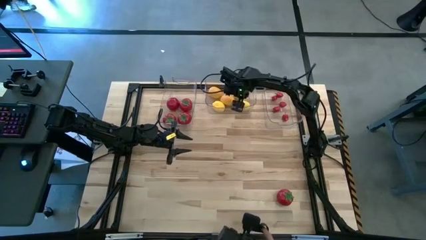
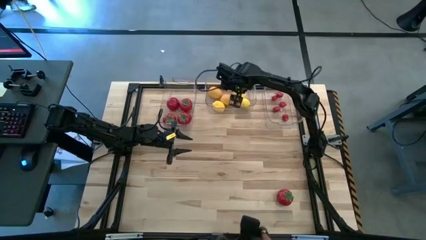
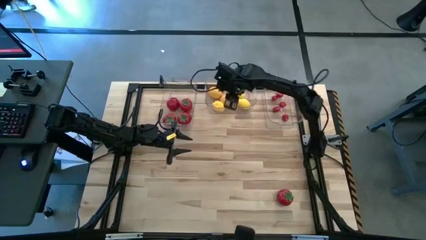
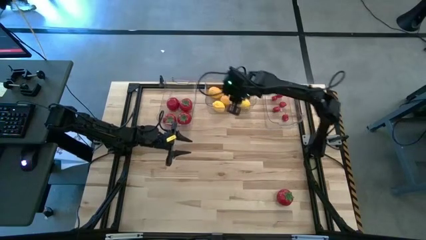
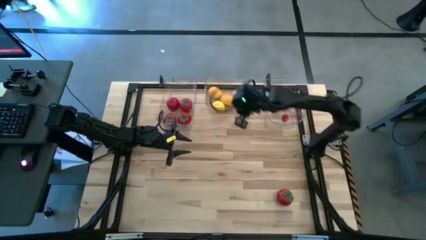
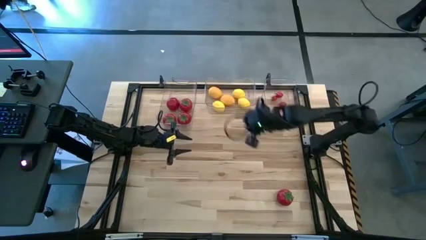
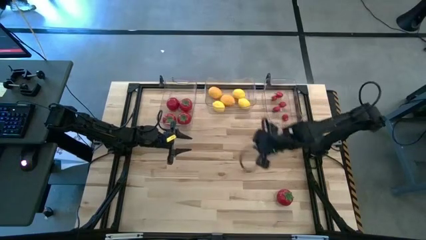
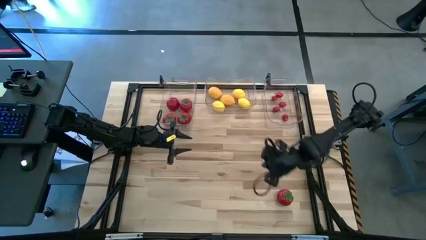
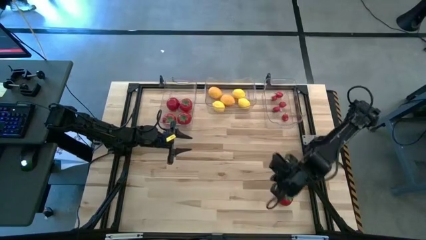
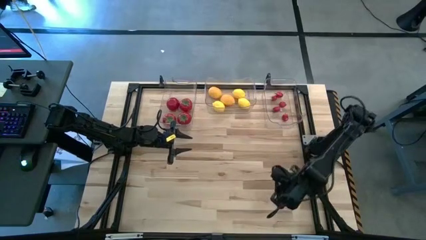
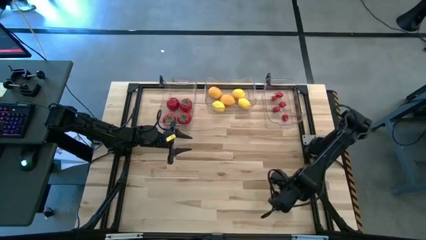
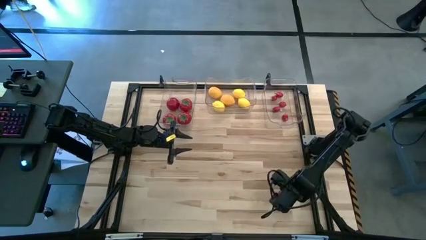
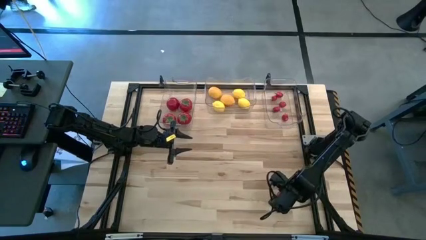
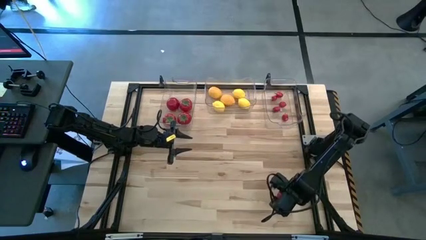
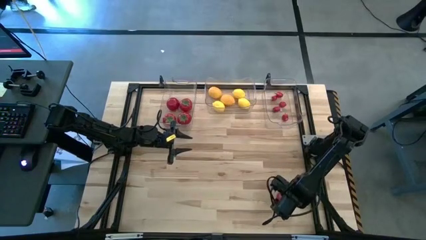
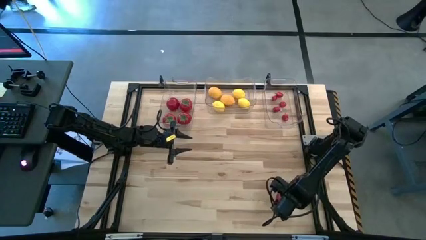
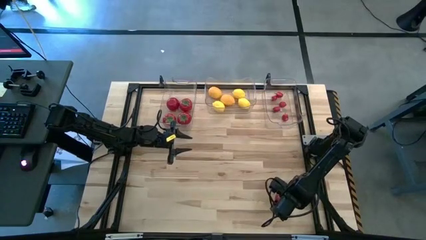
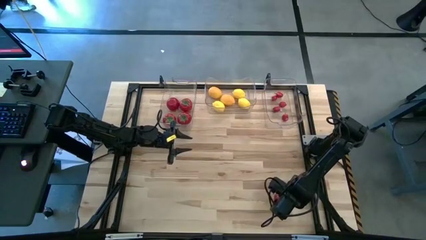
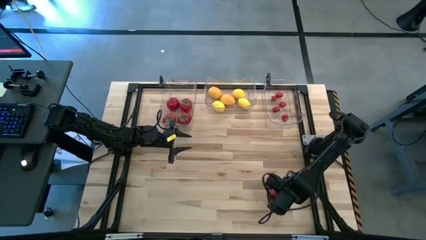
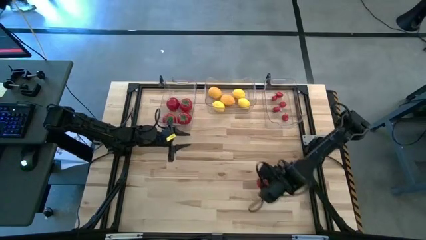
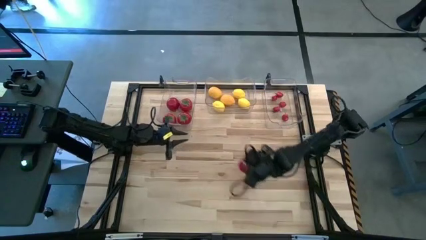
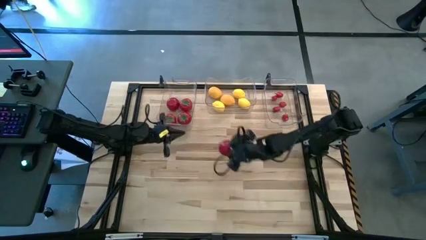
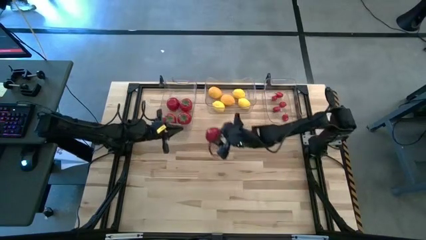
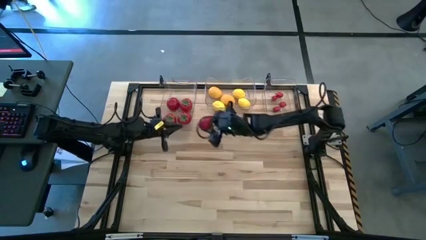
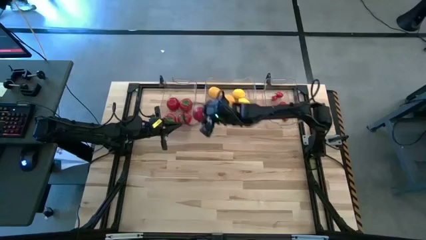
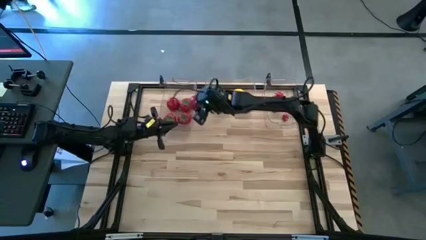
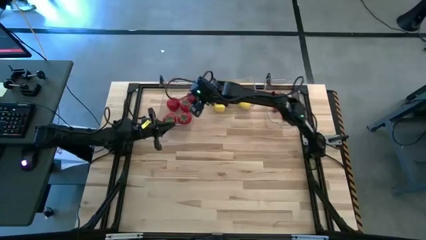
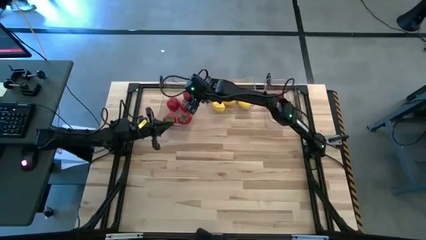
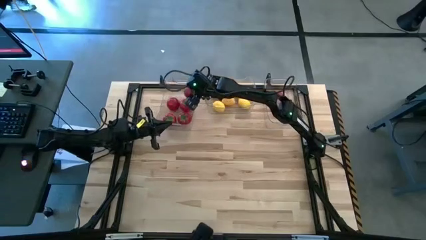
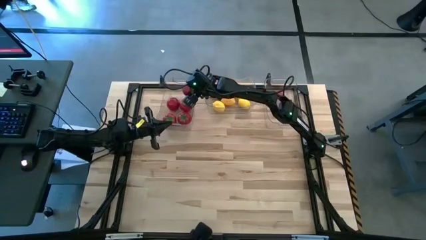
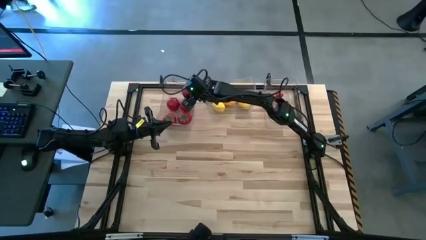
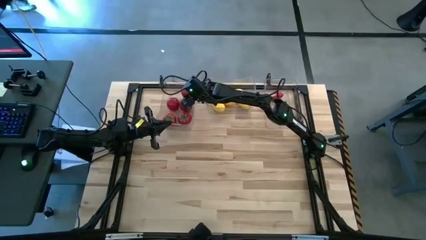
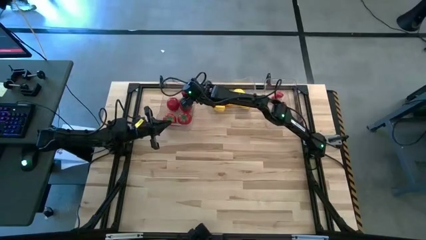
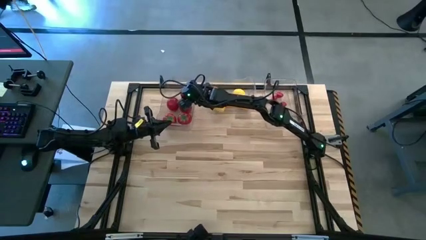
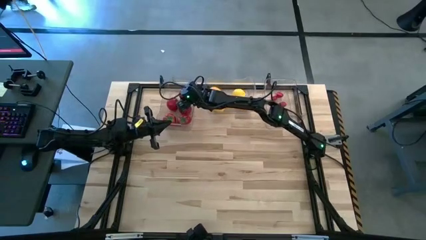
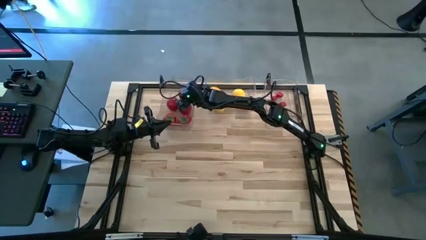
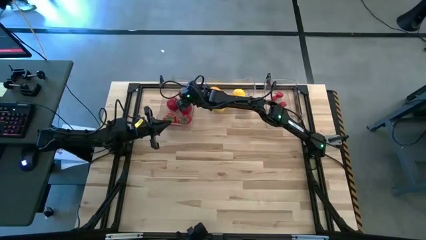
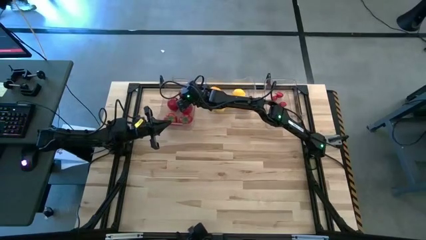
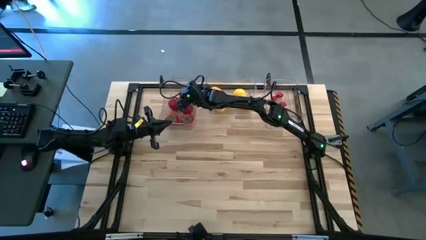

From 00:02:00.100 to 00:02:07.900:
Task: Sort produce into baskets
Put the red tomato into the left transparent bin

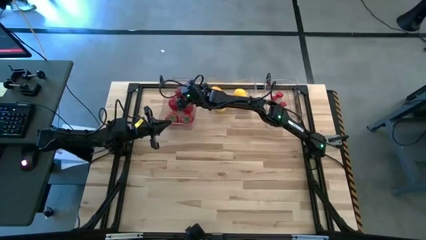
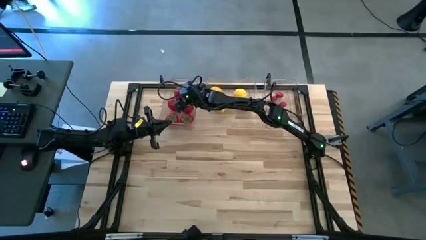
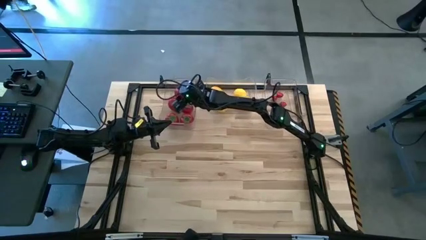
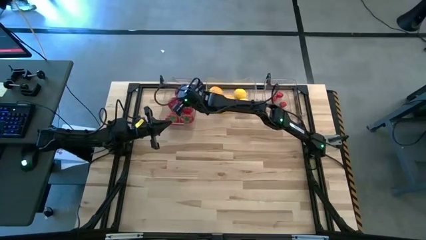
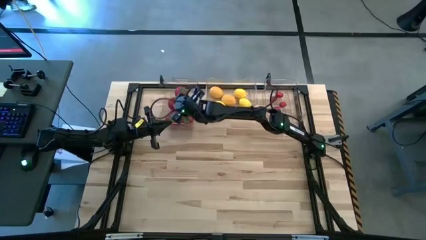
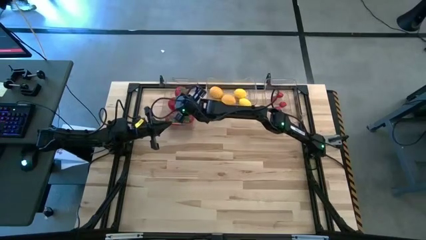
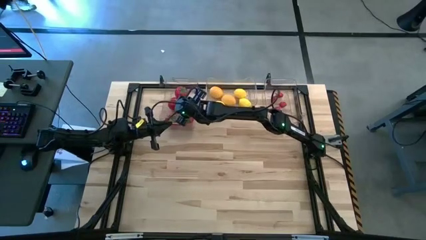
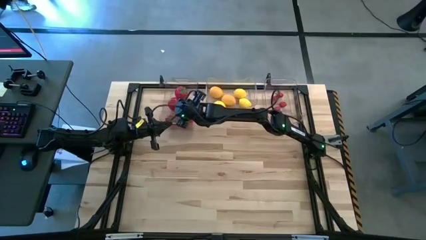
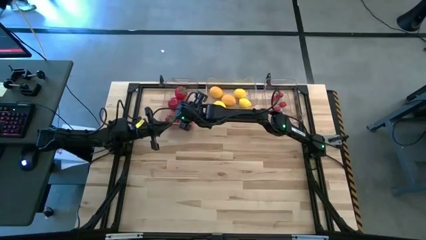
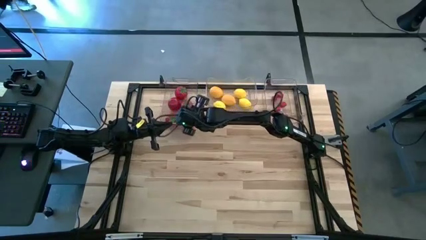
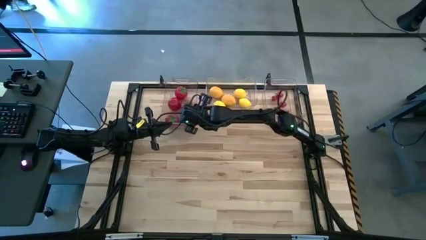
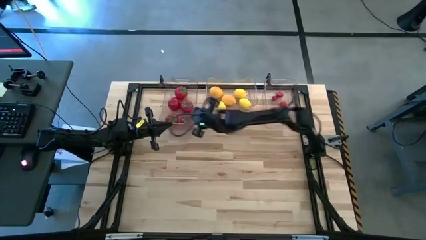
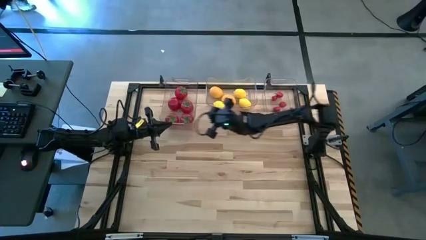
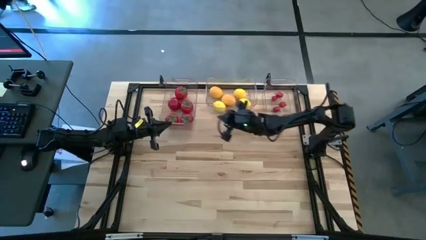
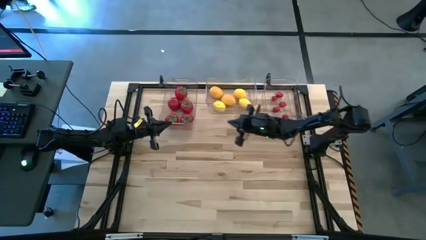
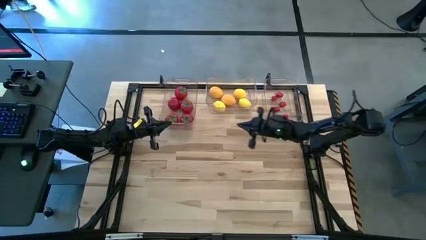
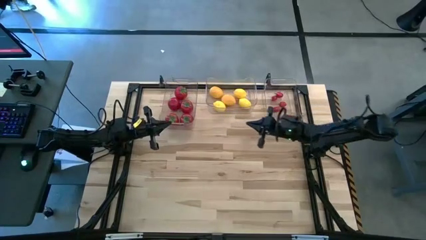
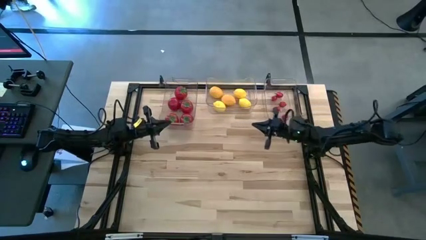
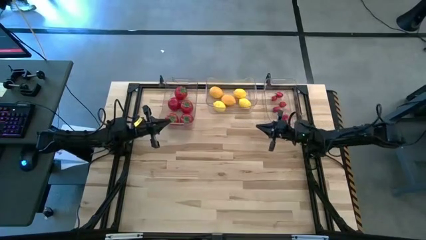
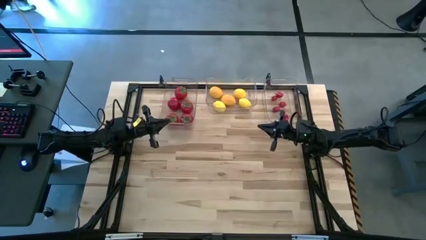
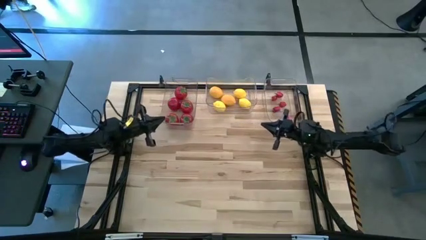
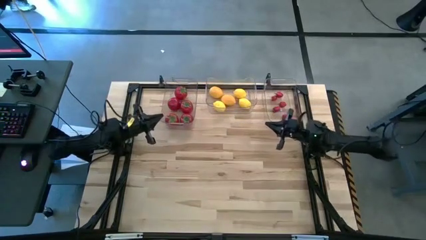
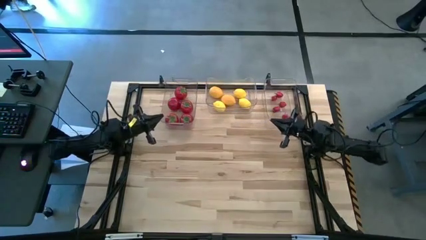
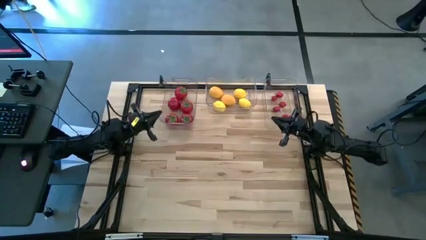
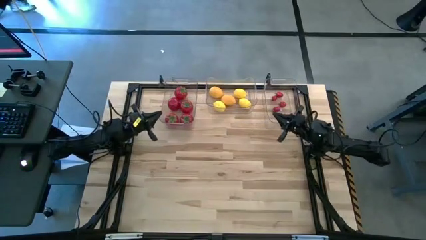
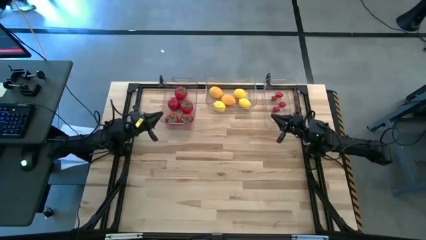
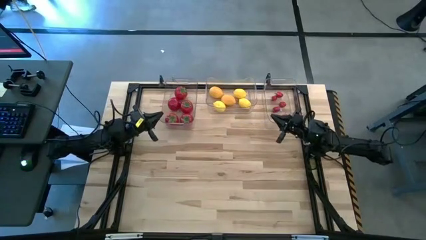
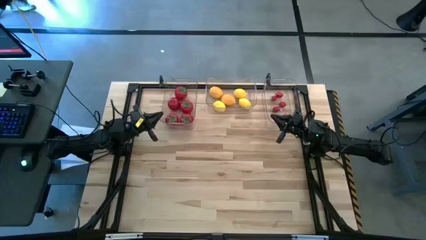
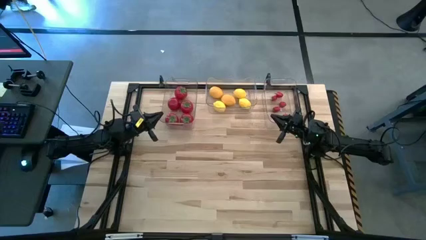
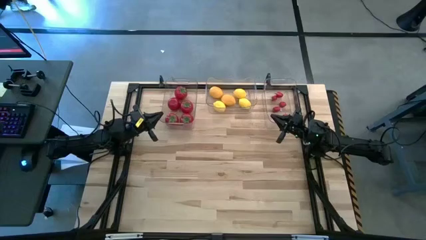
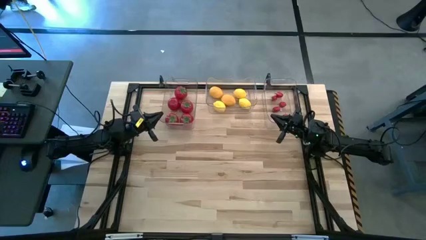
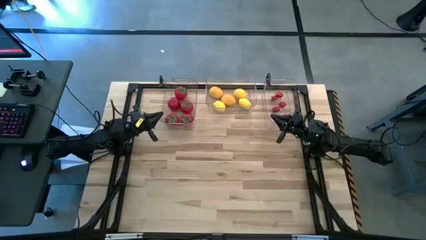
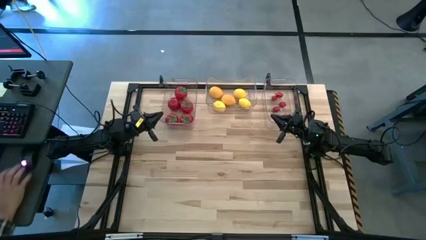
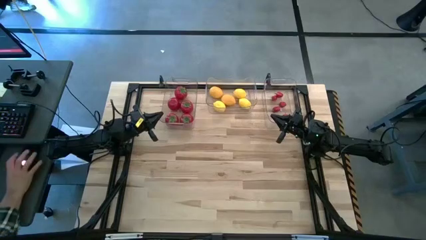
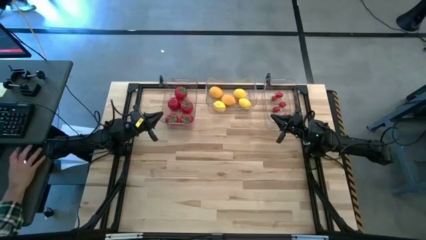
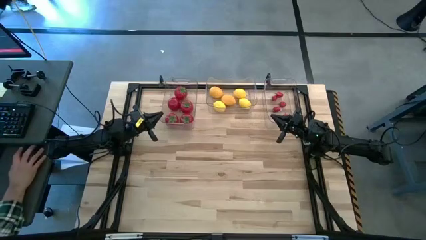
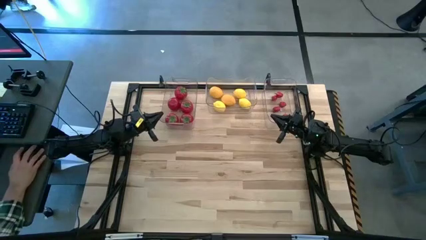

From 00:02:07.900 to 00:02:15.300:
Return to home position
